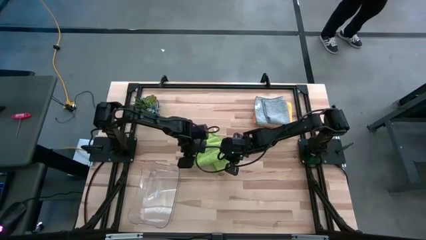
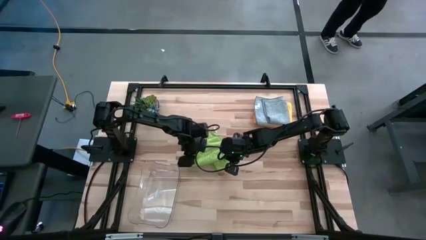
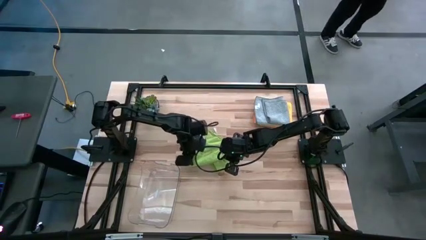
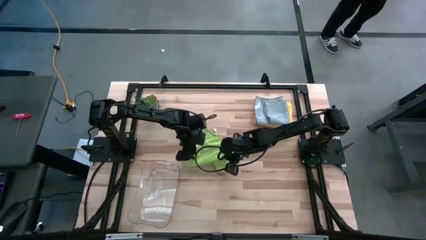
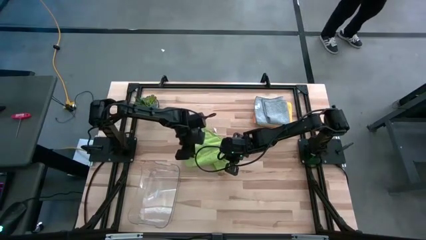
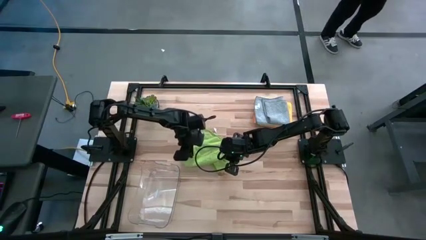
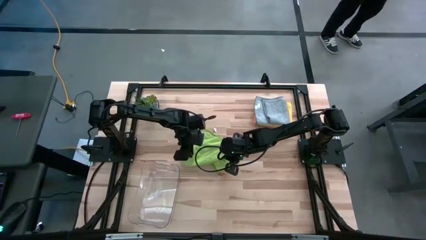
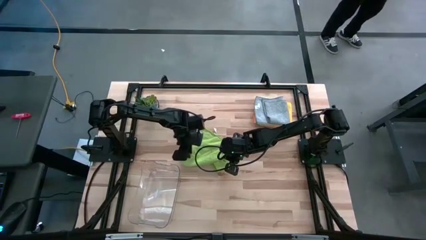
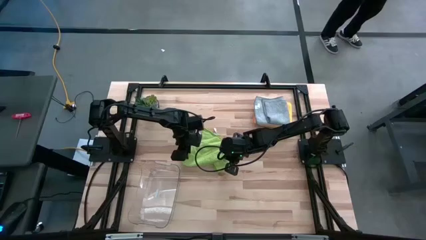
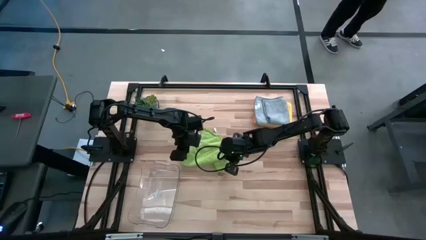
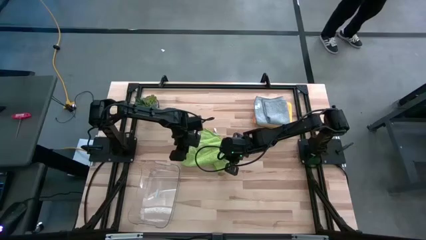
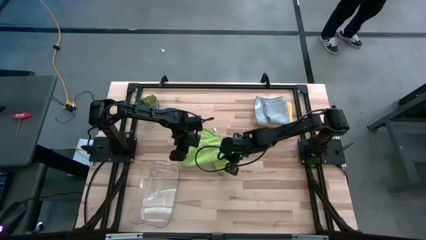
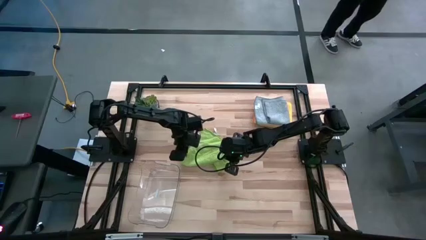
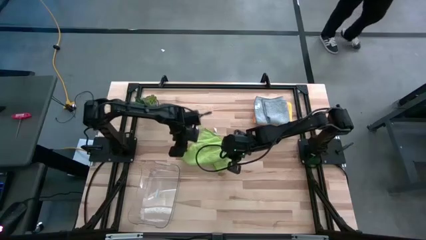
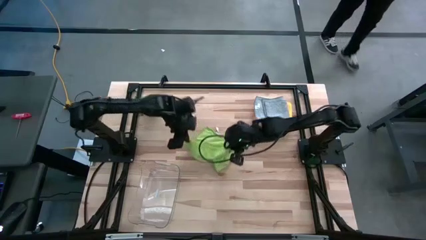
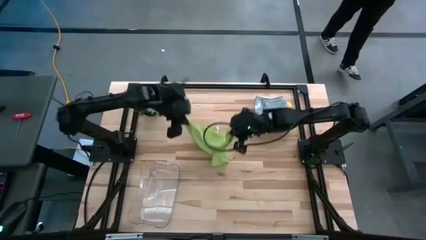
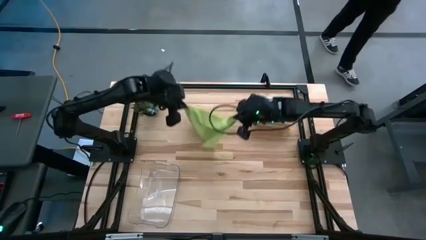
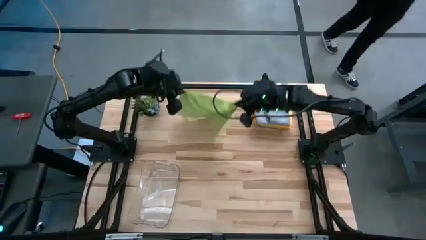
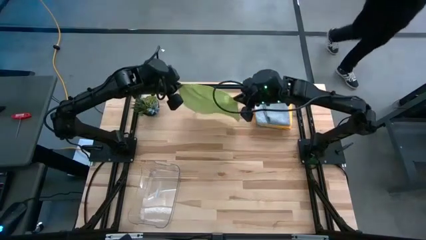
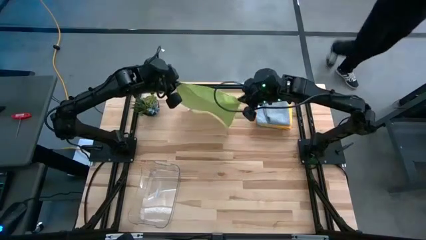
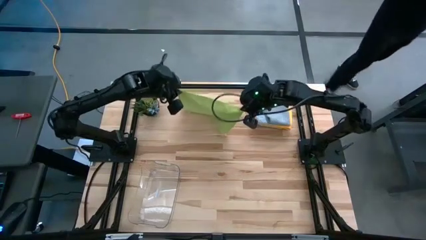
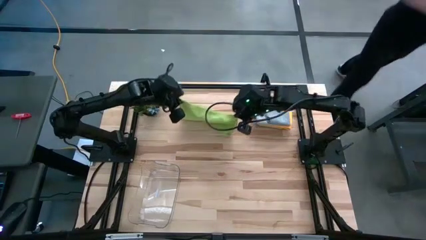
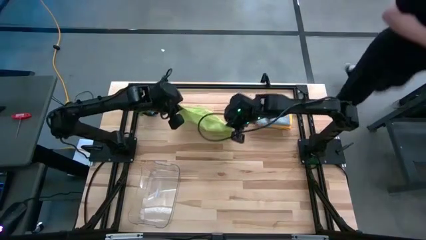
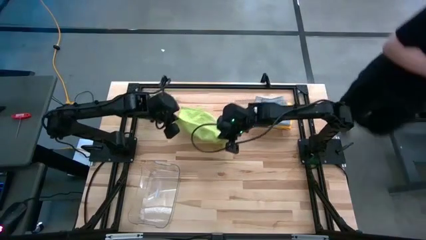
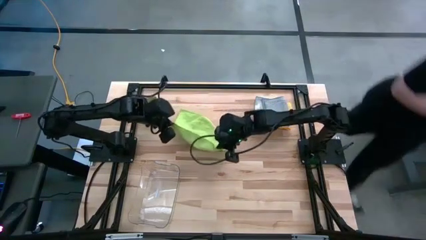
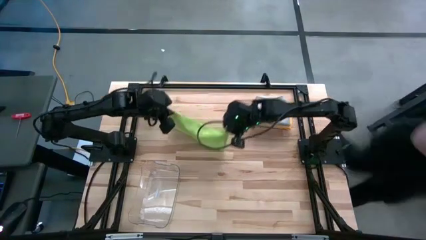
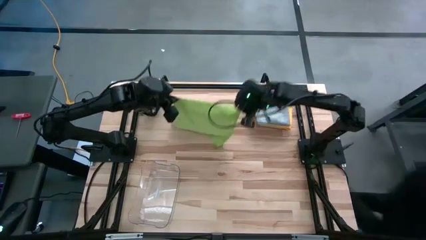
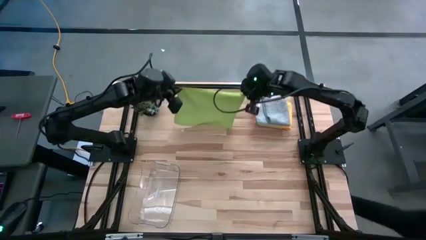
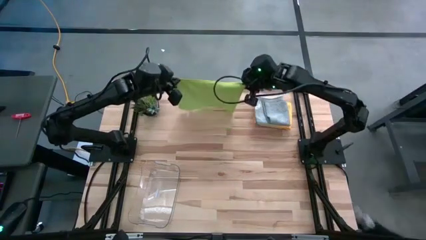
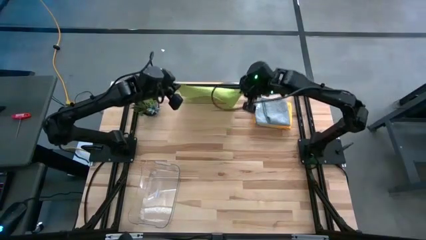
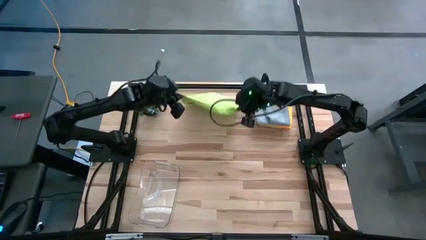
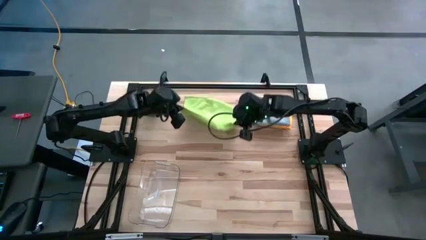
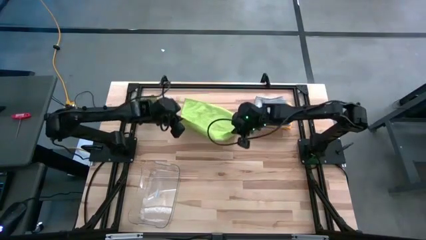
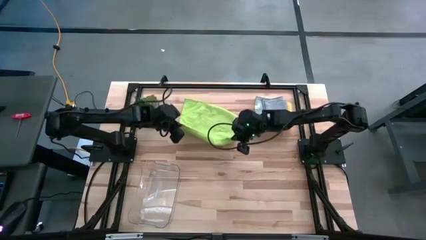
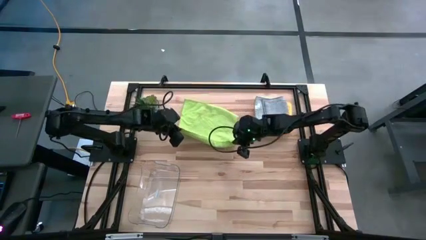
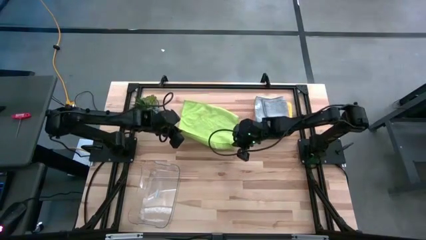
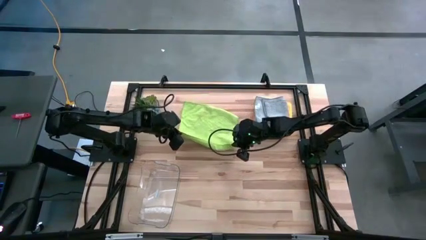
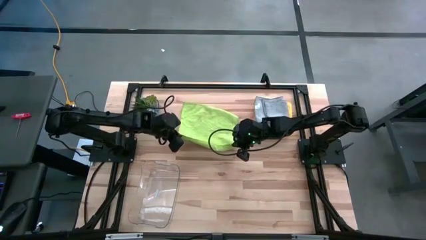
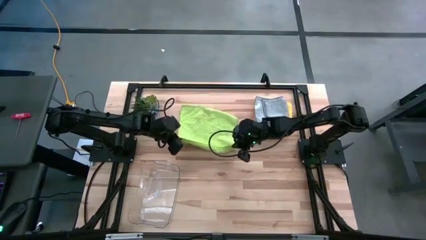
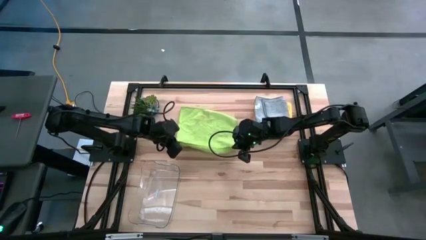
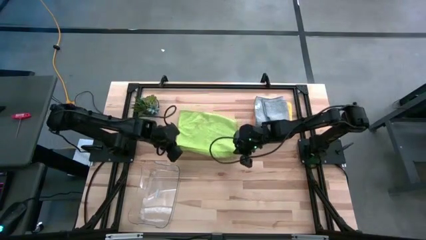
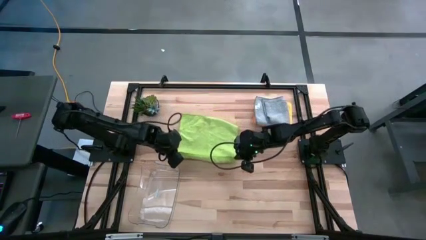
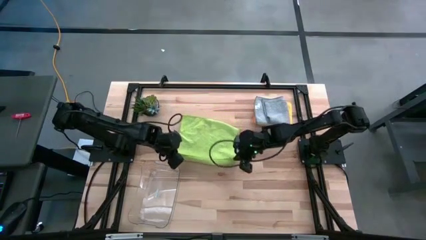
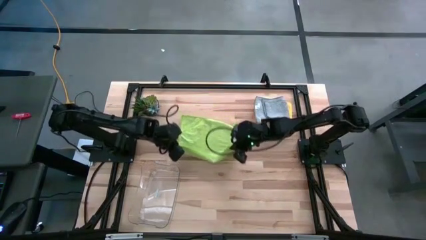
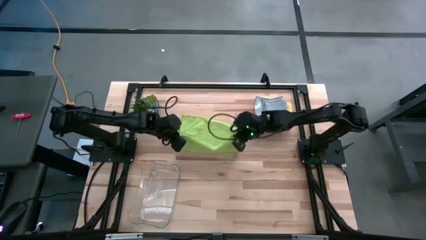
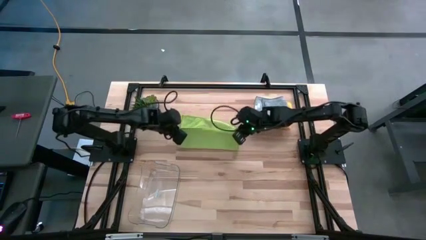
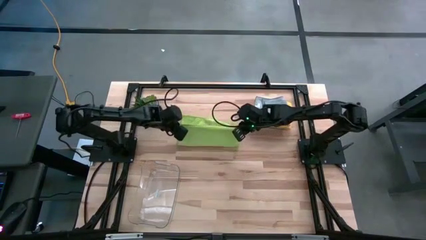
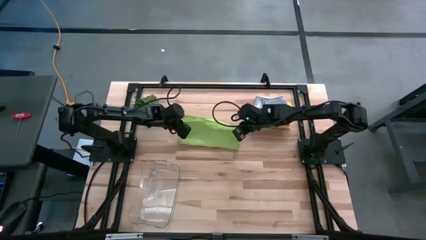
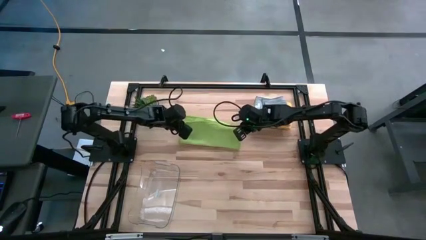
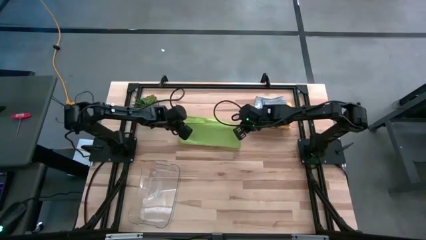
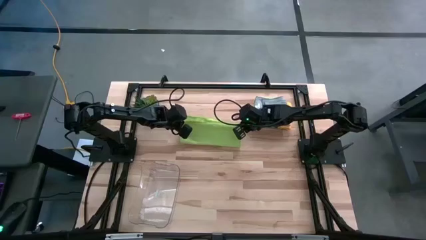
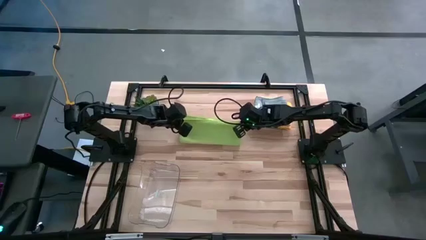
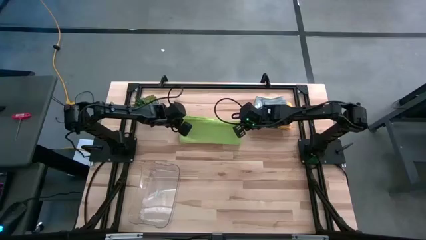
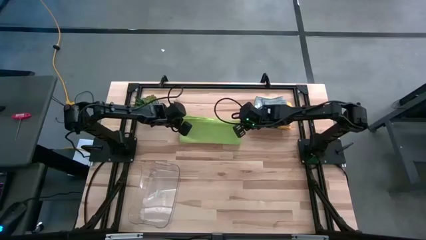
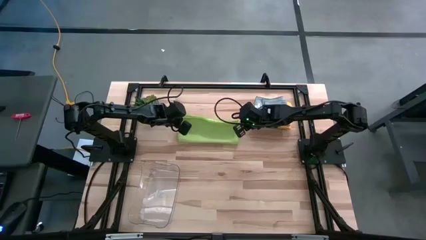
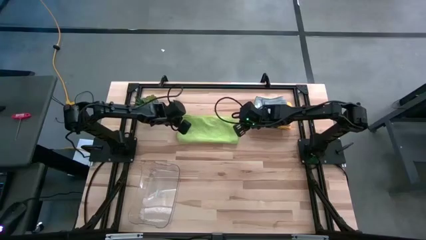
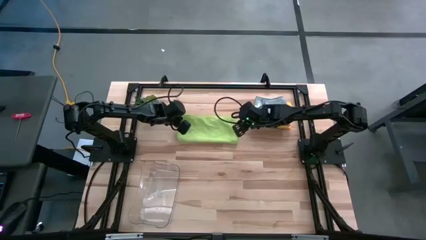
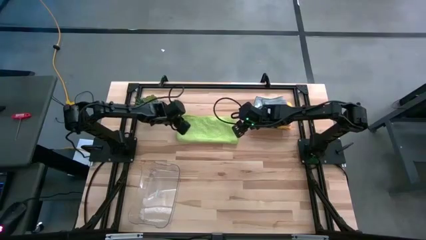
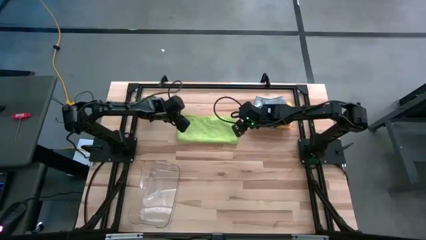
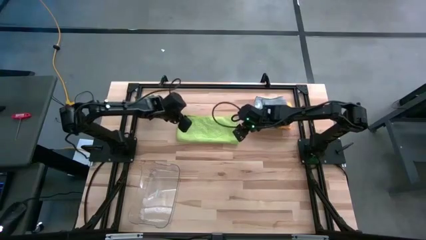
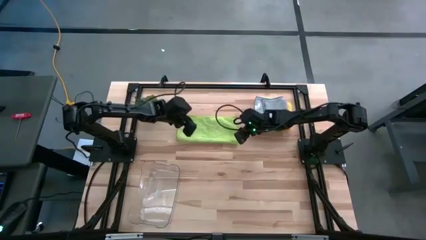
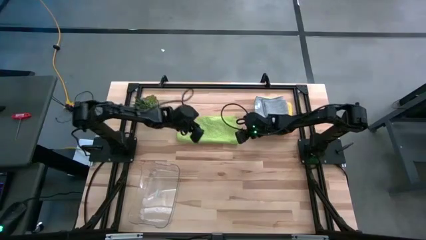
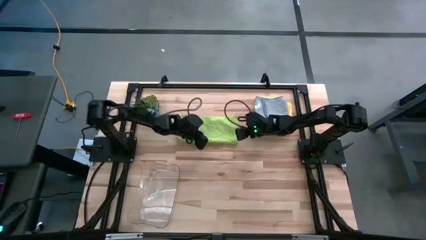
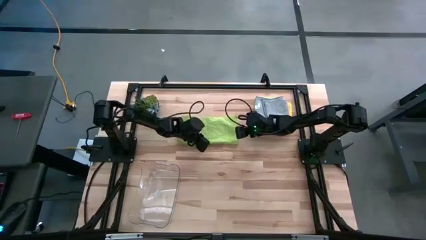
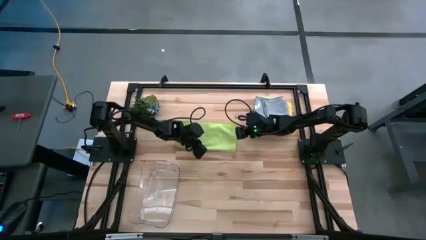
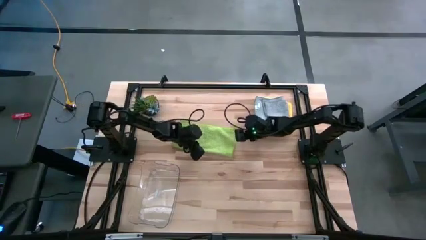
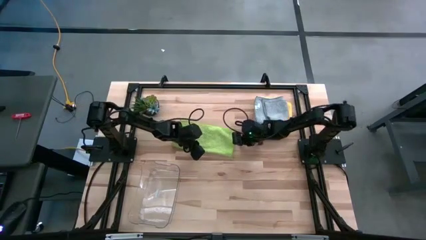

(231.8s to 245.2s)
Task: Fold microfiber towels
Fold the green towel

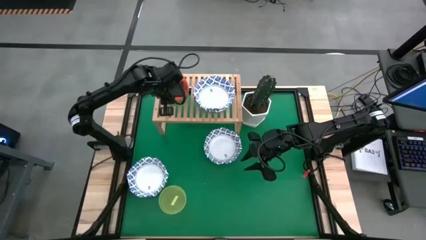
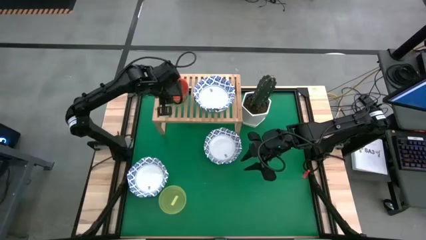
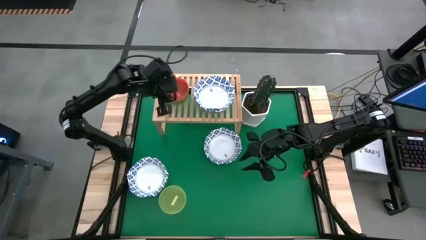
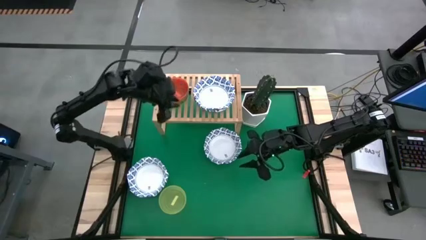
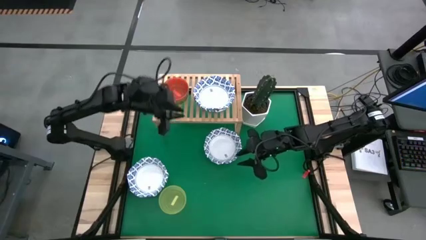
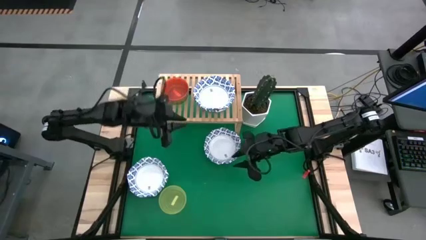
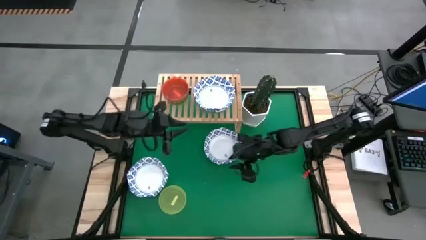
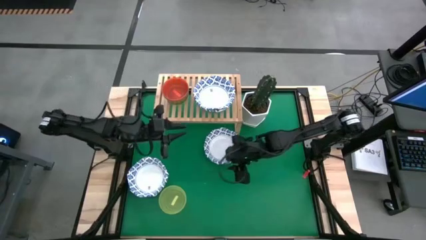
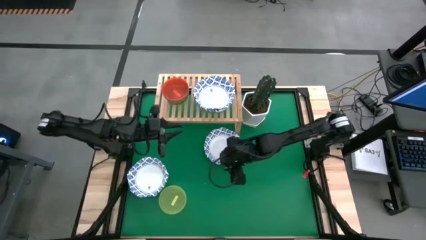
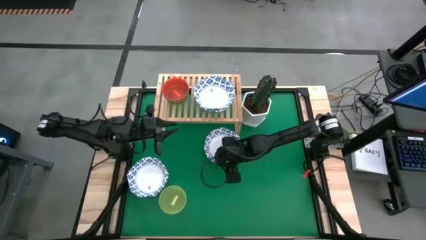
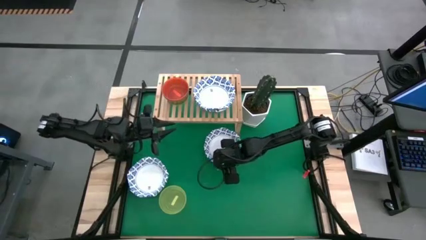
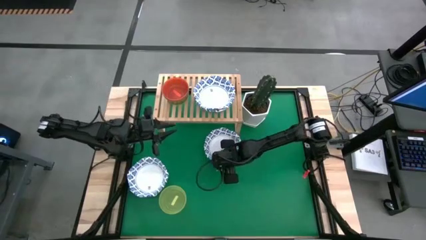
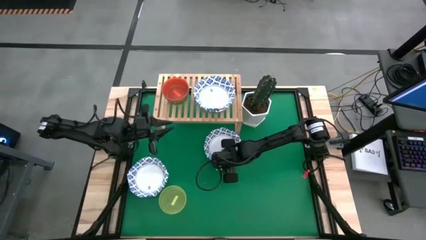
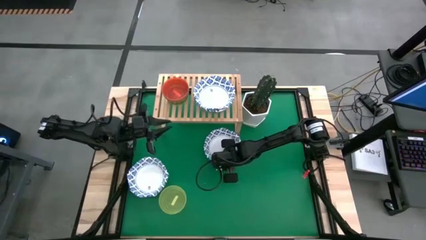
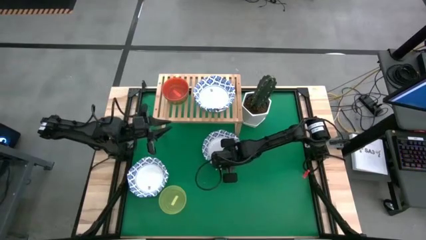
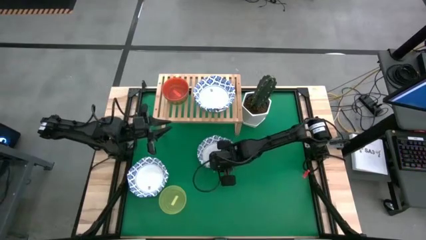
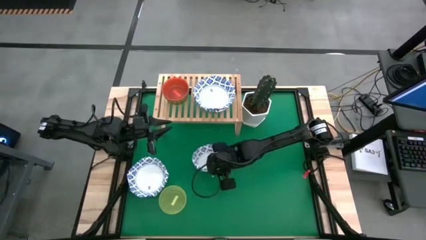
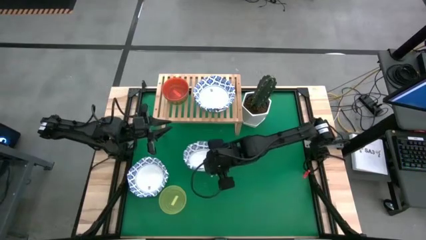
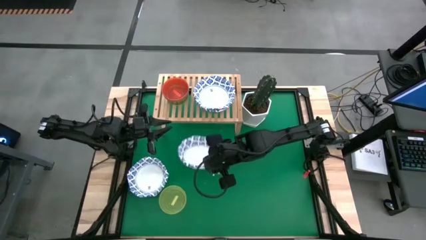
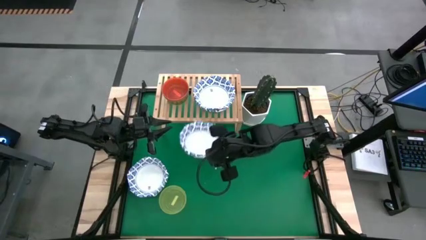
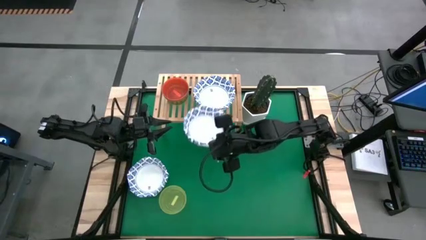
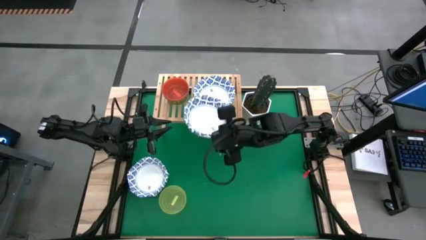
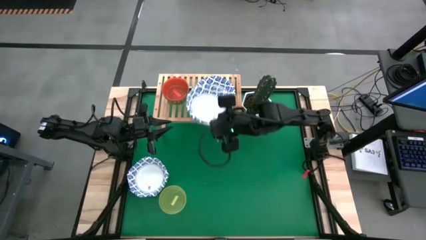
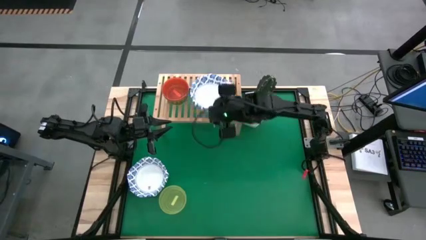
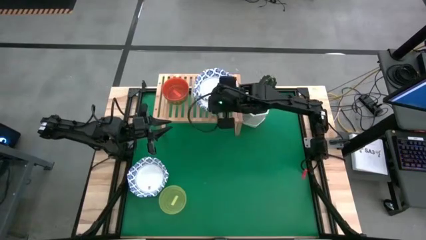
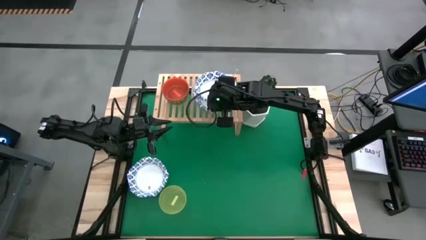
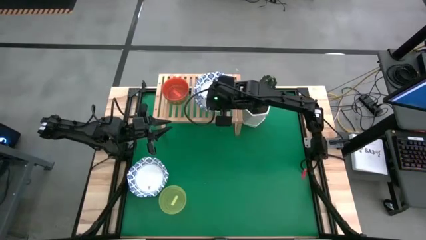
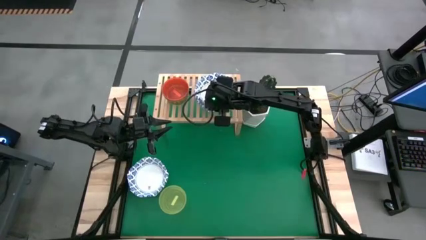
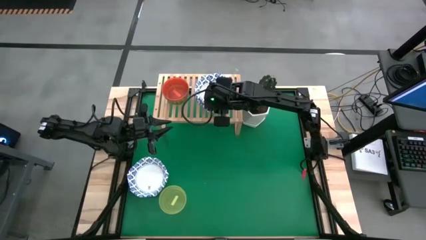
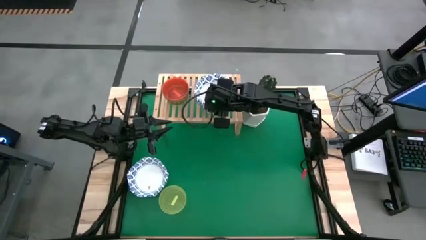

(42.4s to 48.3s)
Task: Place and stack bowls onto a shelf
Stack the right white patterned bowl on top of the white patterned bowls on the shelf
